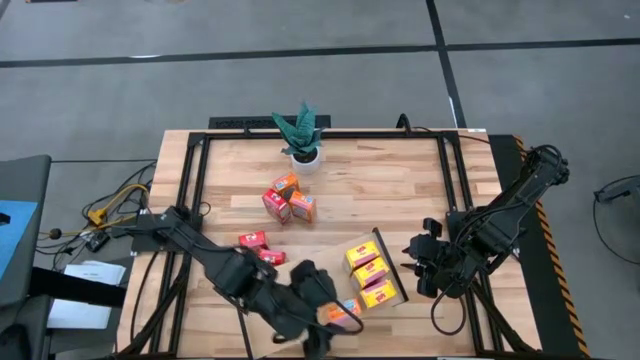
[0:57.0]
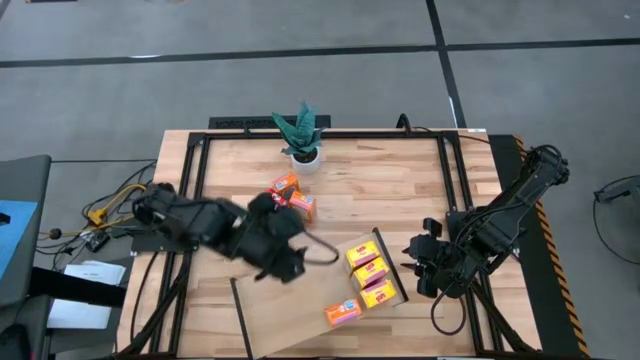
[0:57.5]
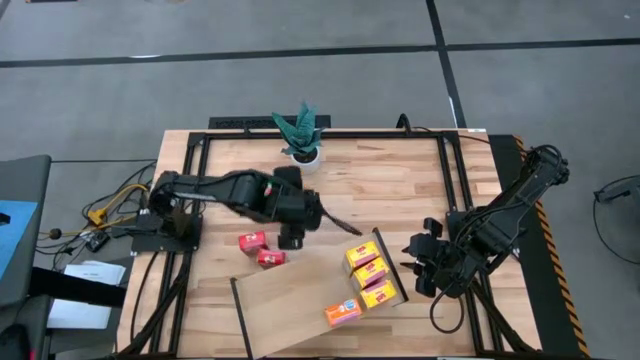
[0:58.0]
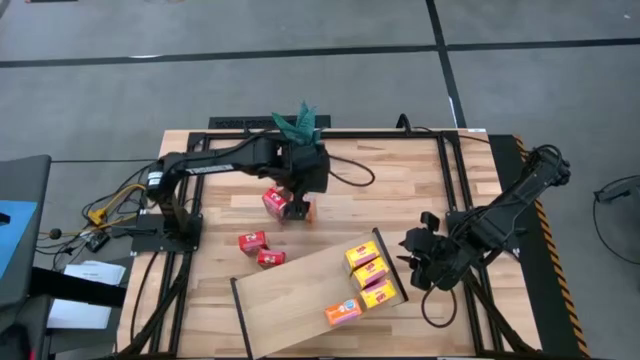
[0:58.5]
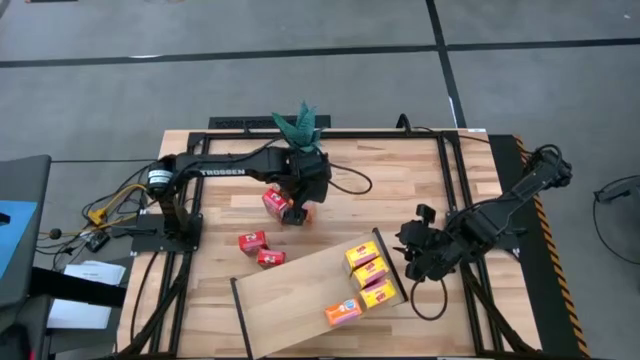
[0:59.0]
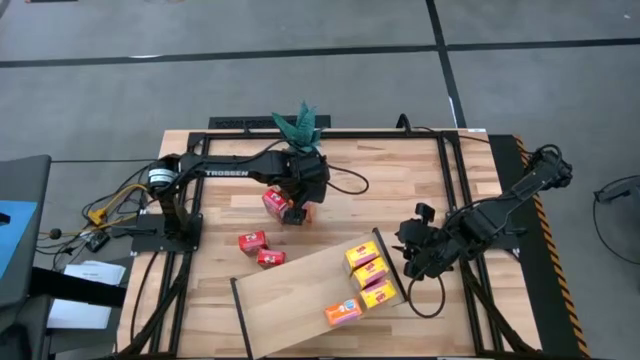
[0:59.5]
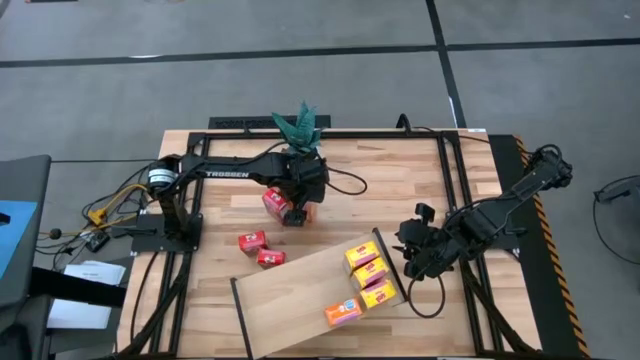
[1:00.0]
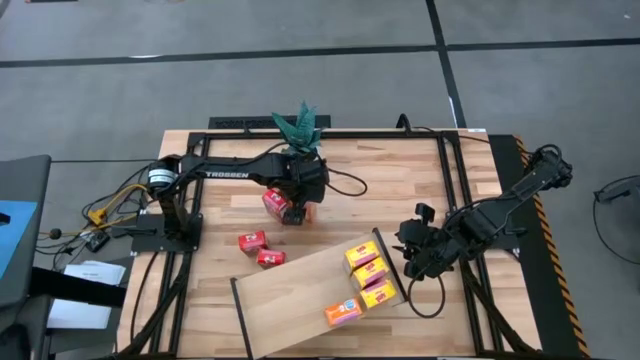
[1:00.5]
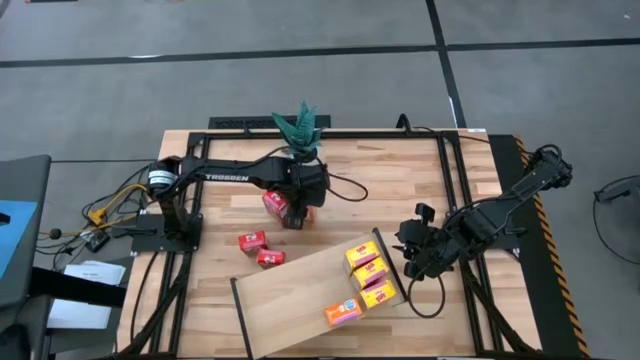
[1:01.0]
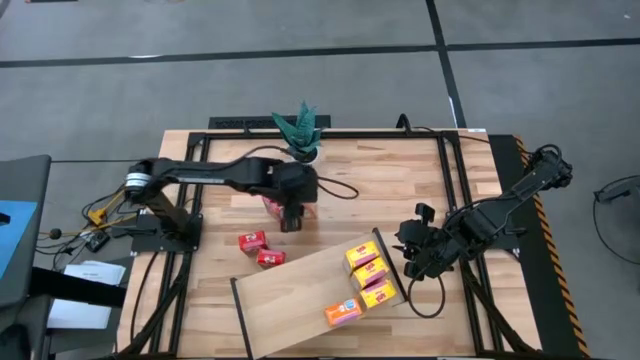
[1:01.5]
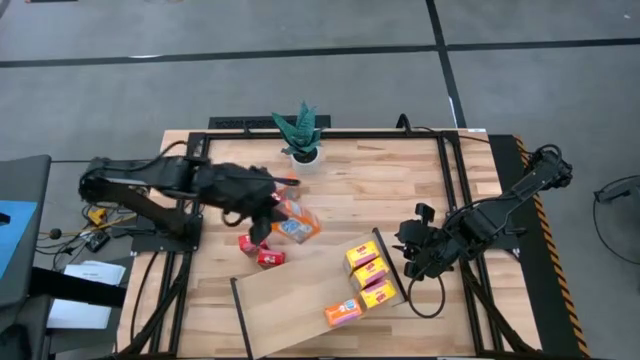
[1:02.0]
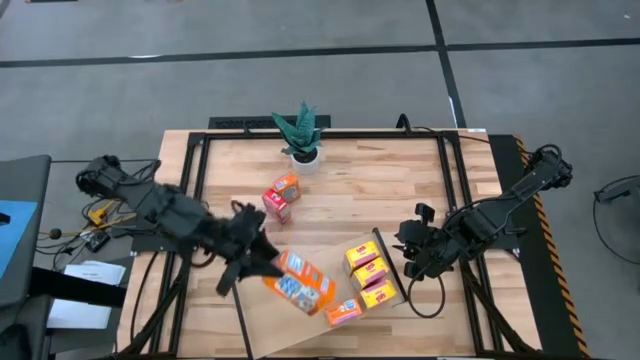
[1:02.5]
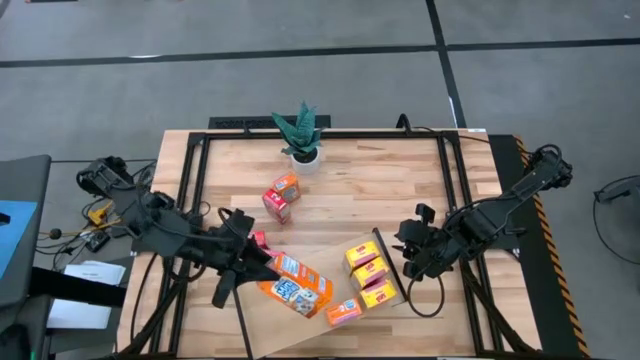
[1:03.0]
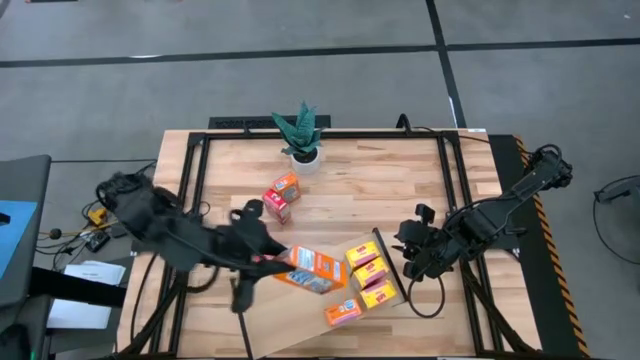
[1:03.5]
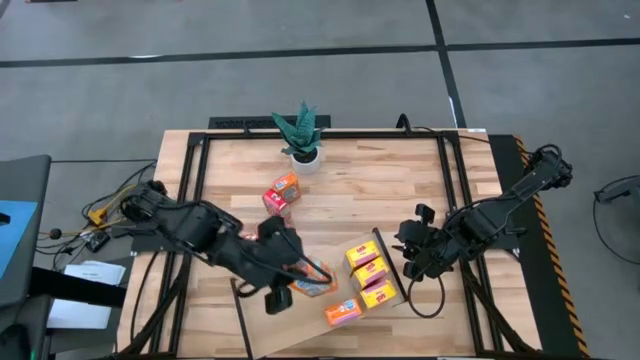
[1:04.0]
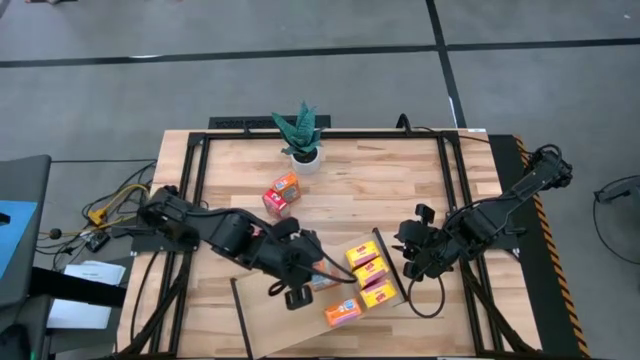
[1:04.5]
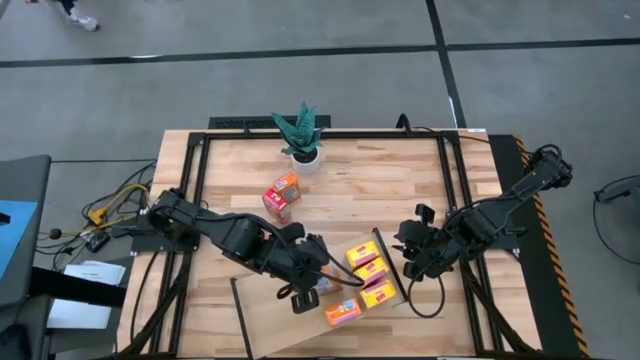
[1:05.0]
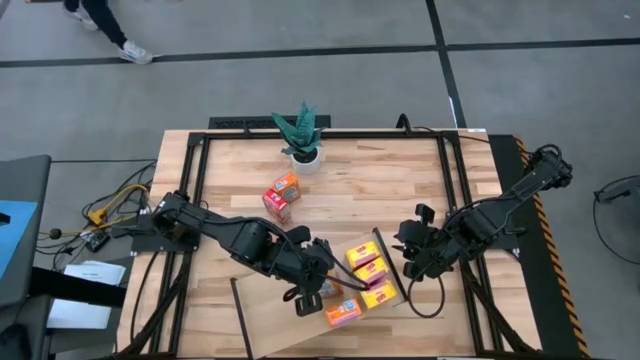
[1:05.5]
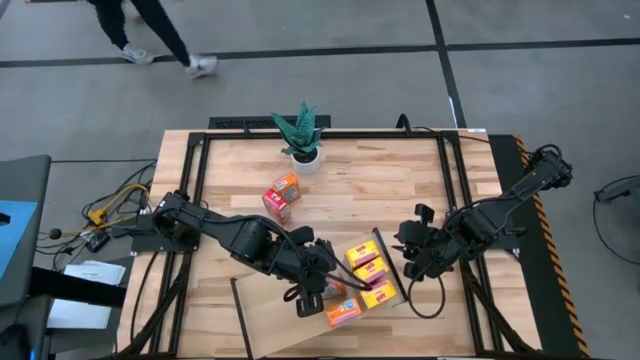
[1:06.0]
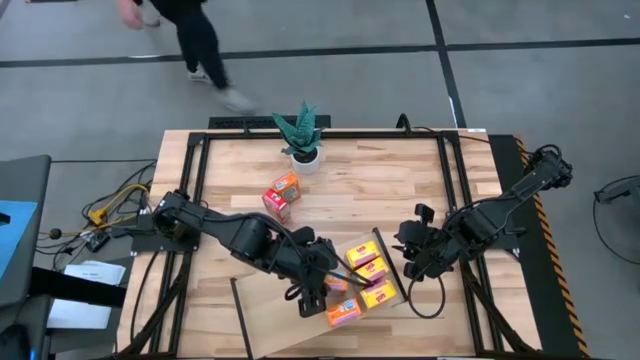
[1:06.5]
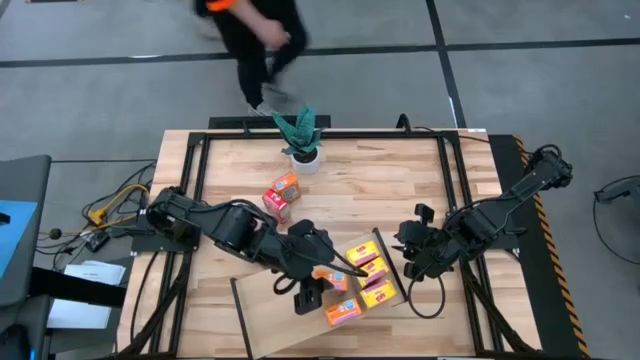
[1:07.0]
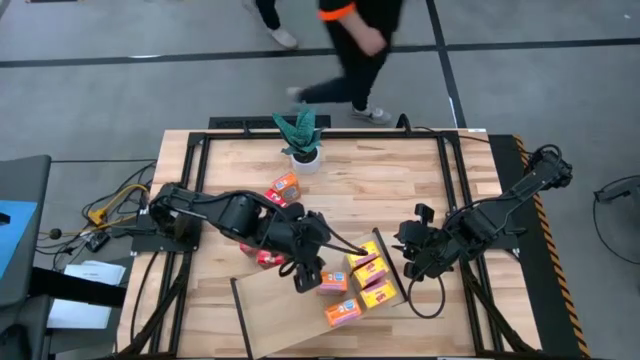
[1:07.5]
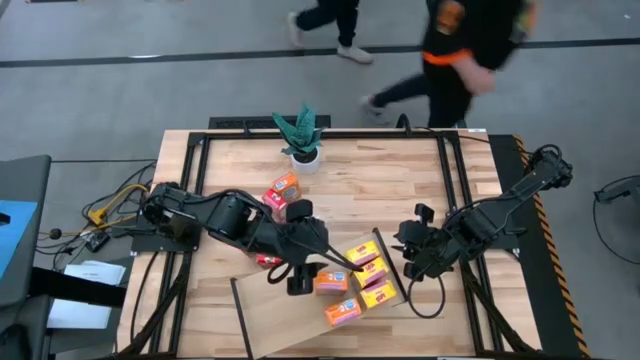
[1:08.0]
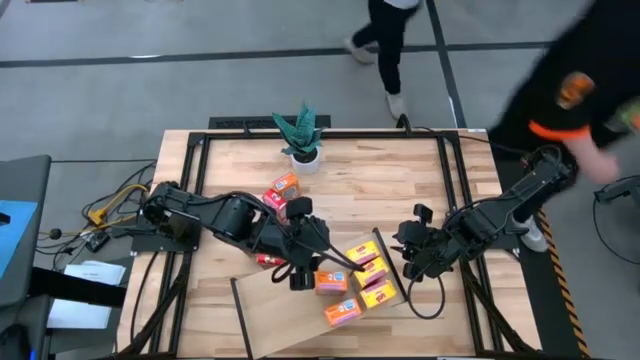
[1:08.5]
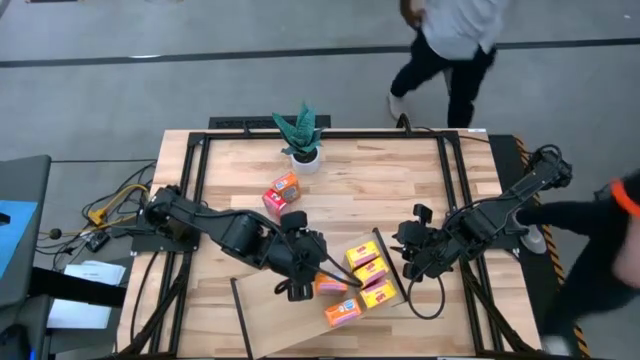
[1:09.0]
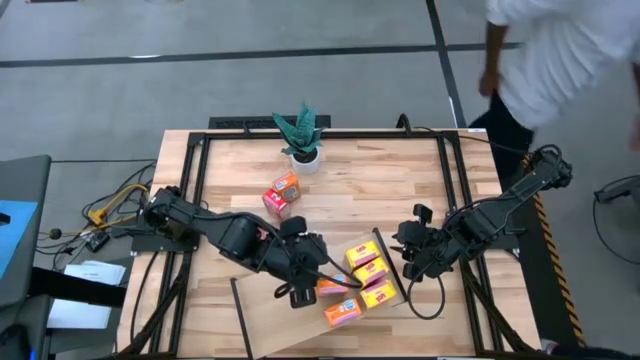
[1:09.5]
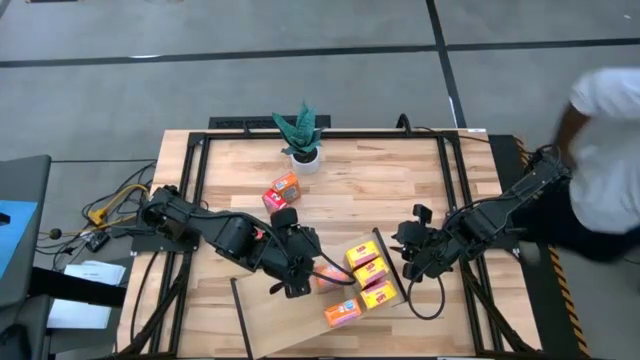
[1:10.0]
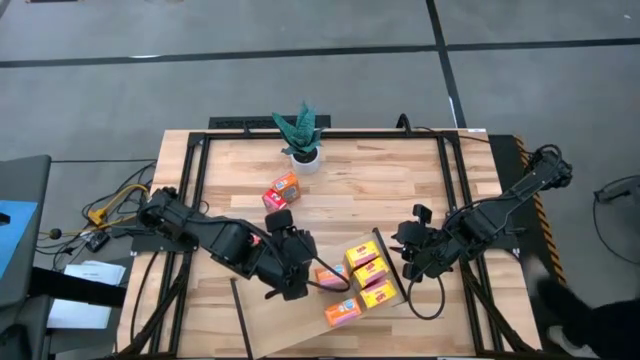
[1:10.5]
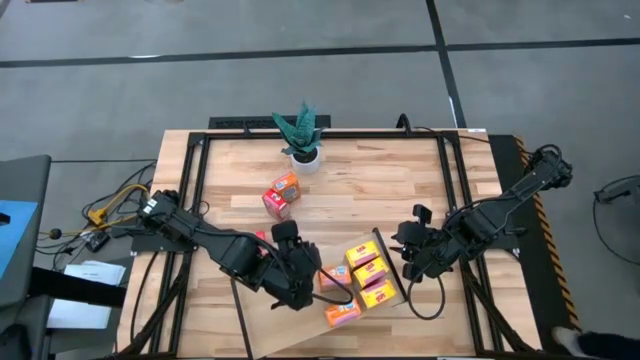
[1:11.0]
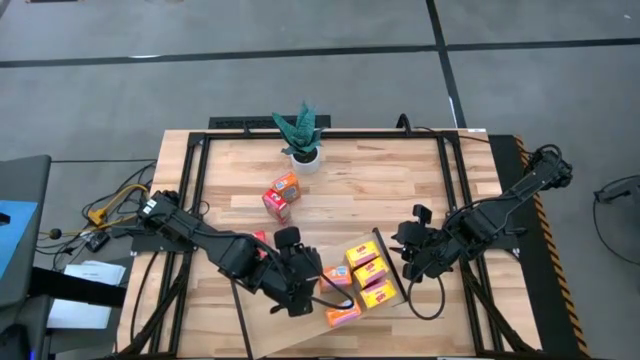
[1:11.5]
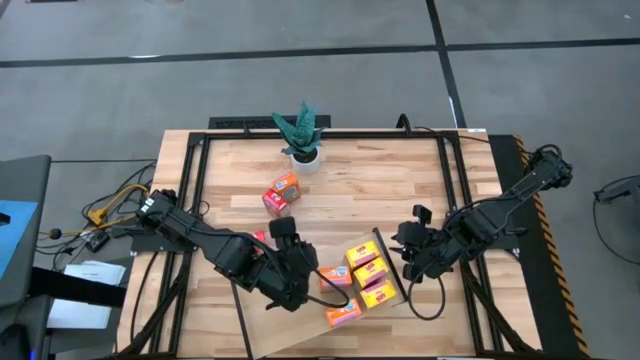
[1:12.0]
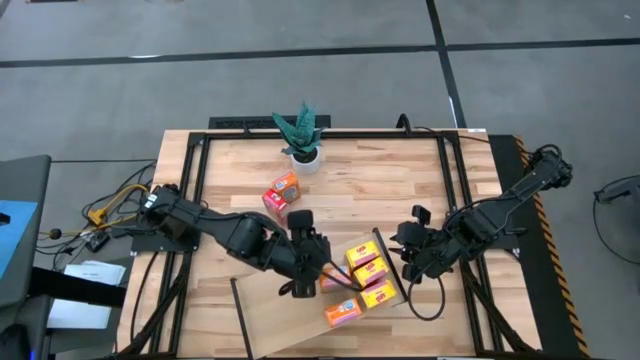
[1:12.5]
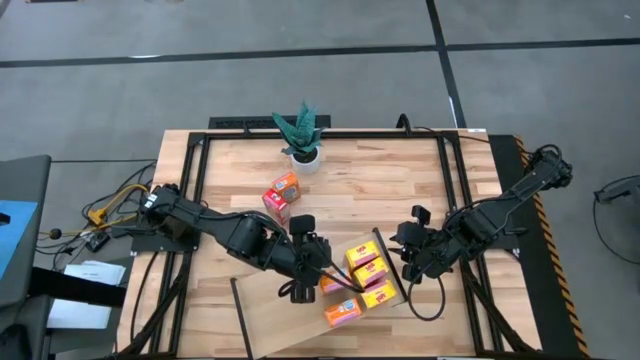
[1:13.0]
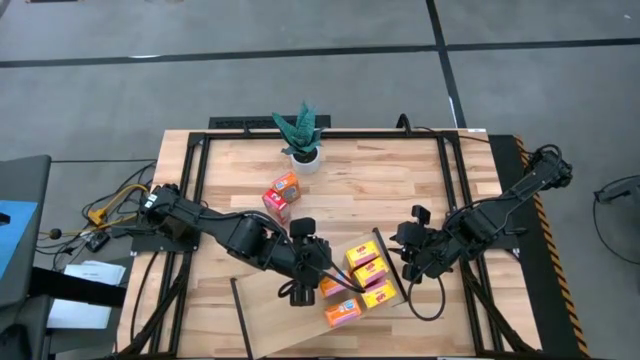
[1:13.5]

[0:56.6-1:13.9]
Task: Stack cereal on shelf
Put the bottom orange cereal box on the shelf aligned with the orange cereal box

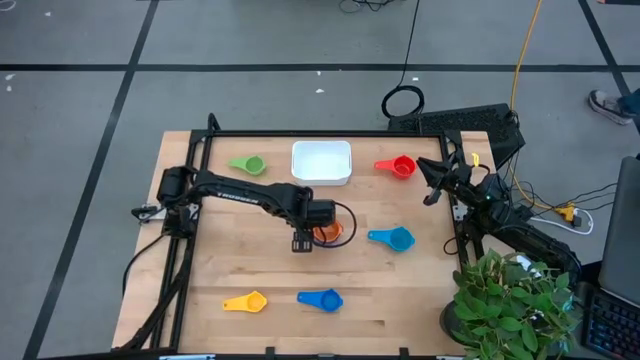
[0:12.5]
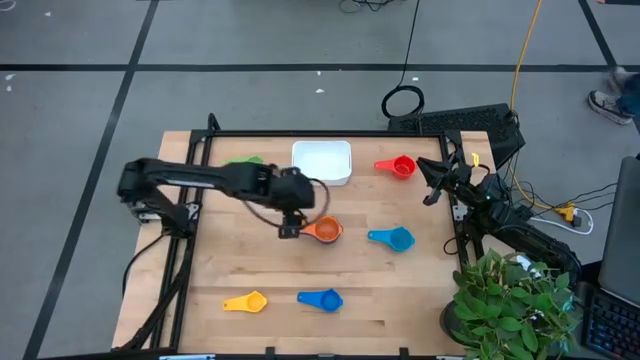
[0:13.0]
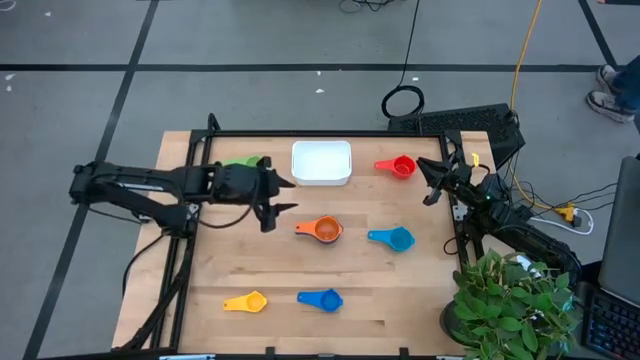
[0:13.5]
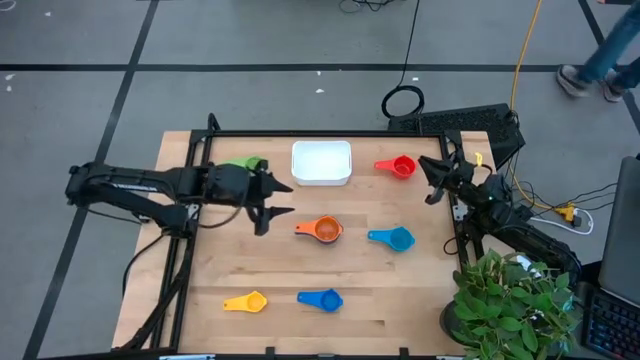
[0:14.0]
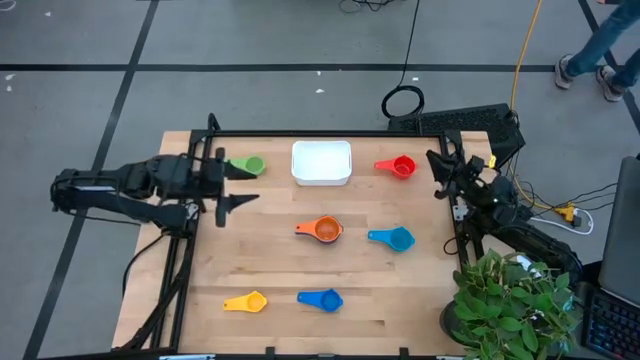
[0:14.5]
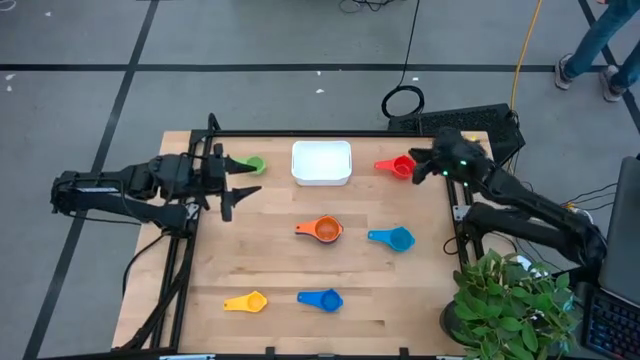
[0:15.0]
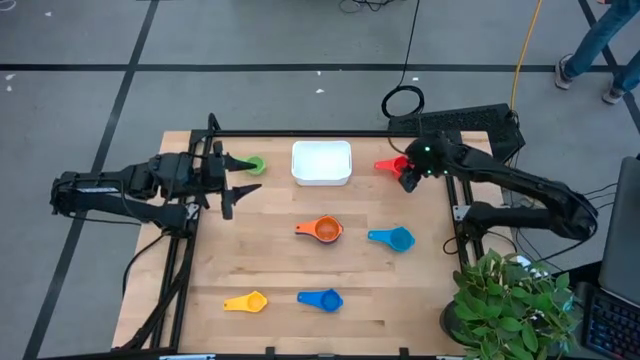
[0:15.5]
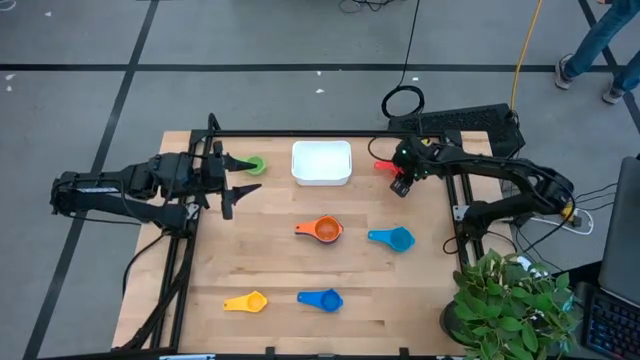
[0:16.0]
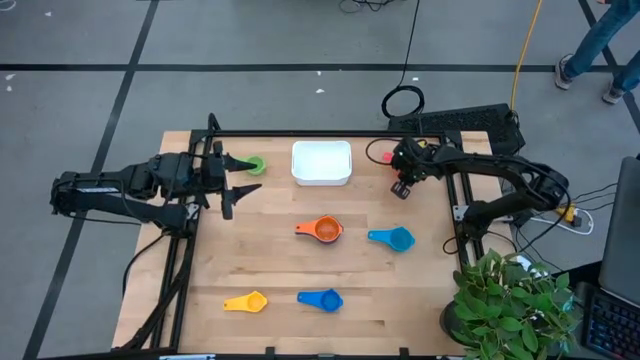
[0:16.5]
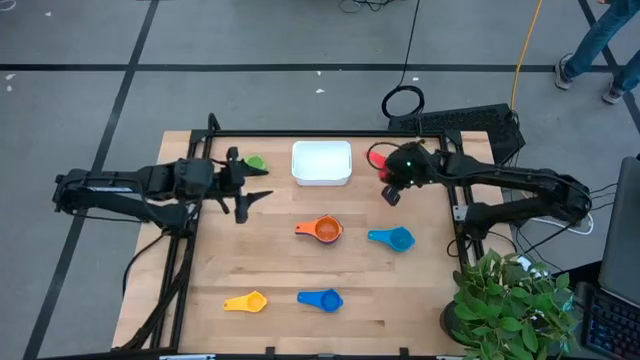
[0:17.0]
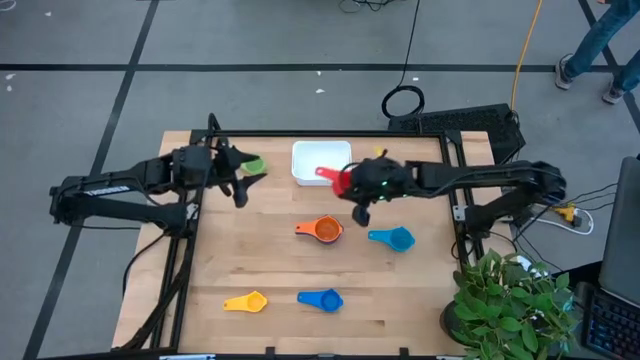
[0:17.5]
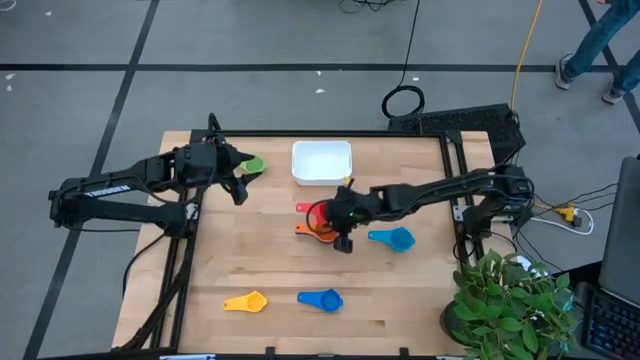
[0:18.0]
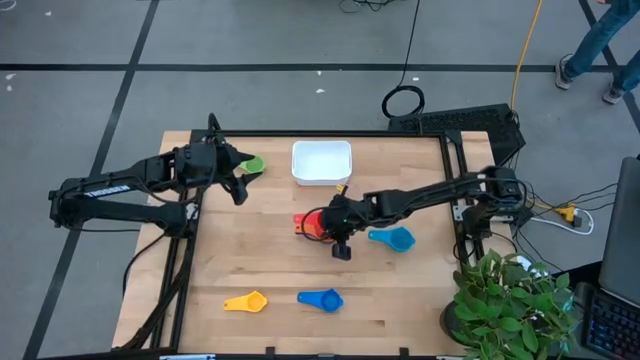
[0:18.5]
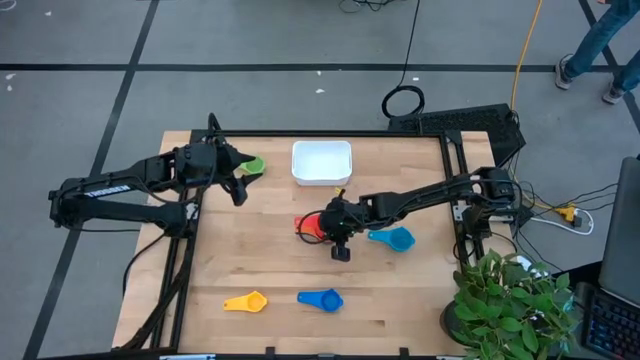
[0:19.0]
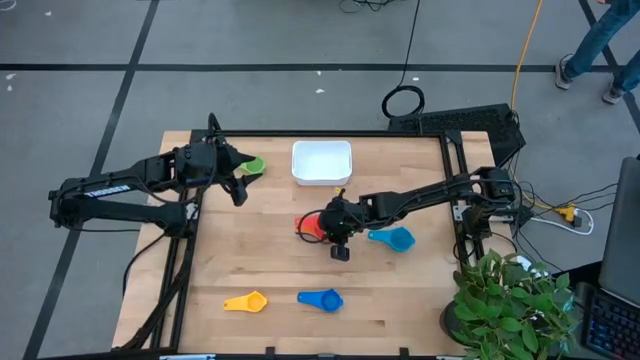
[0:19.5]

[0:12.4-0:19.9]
Task: Nest measuring cups in basket
Stack the red measuring cup on the orange measuring cup
